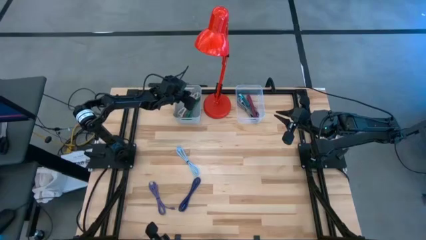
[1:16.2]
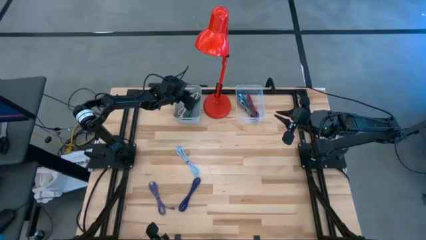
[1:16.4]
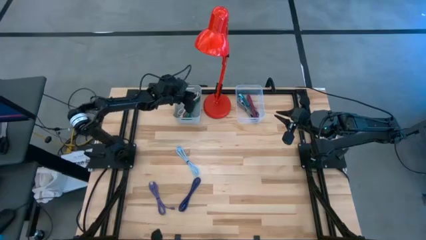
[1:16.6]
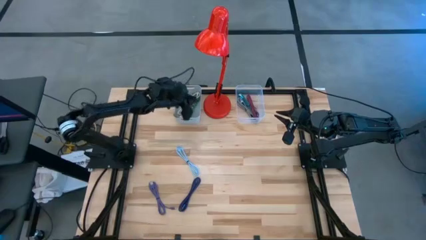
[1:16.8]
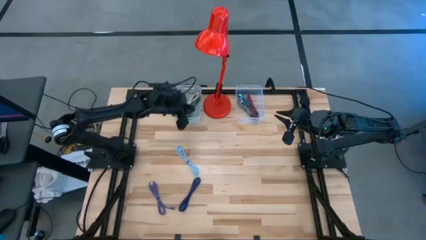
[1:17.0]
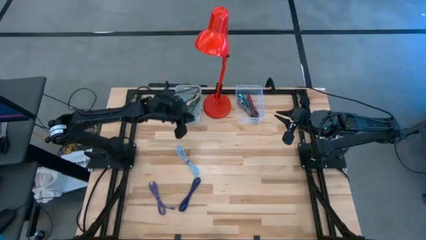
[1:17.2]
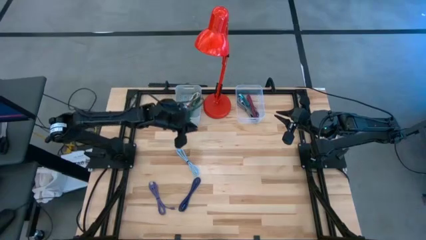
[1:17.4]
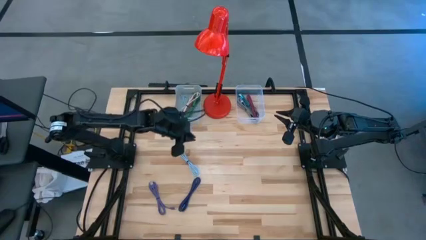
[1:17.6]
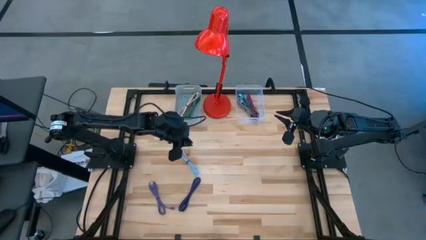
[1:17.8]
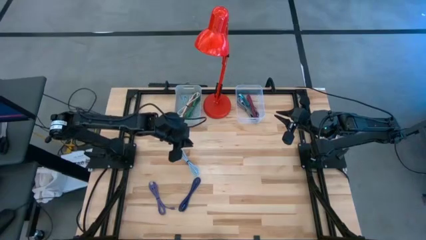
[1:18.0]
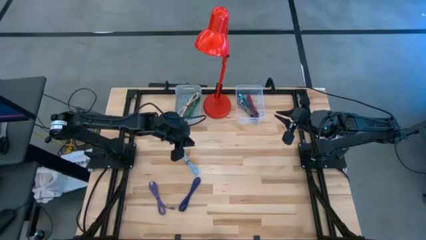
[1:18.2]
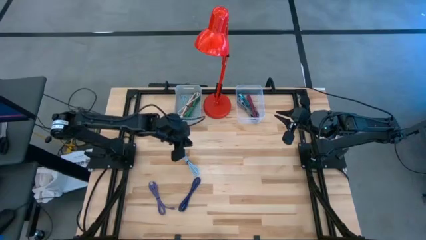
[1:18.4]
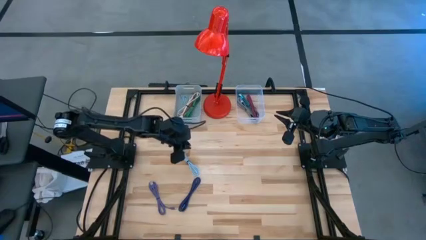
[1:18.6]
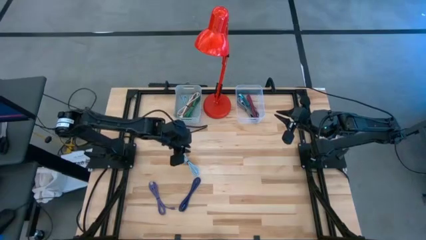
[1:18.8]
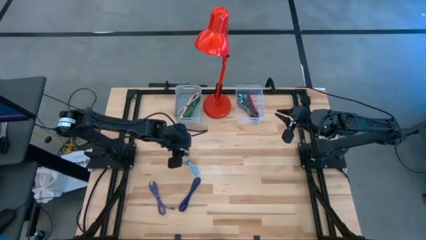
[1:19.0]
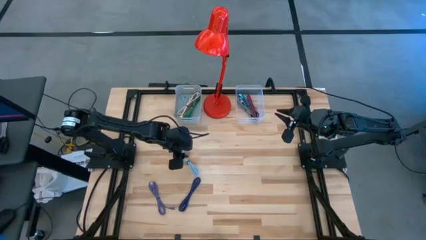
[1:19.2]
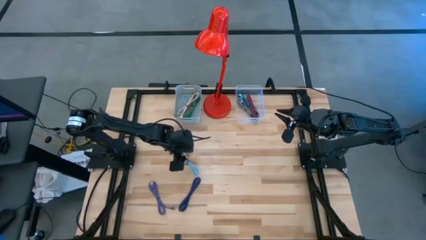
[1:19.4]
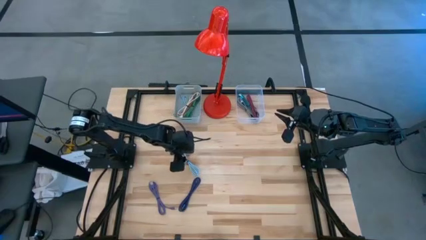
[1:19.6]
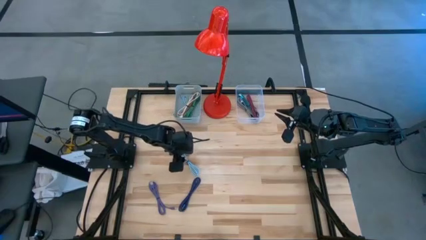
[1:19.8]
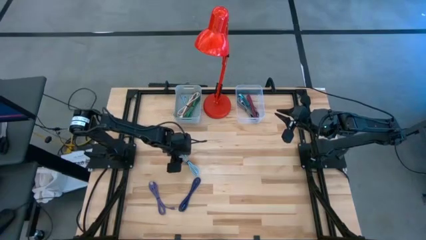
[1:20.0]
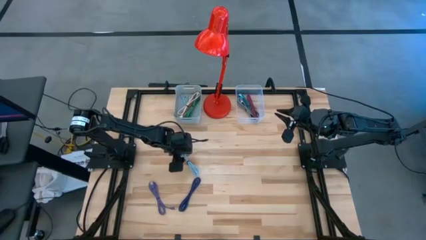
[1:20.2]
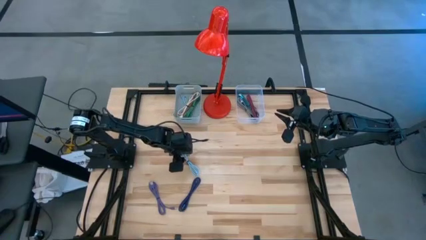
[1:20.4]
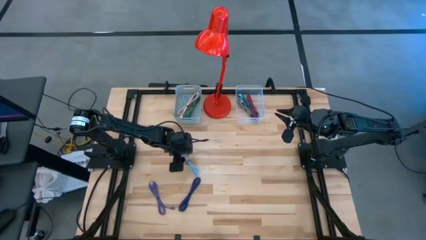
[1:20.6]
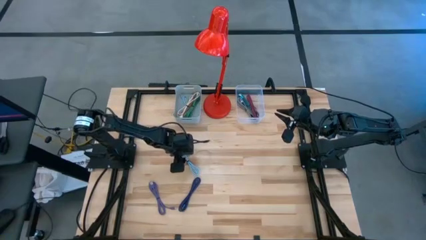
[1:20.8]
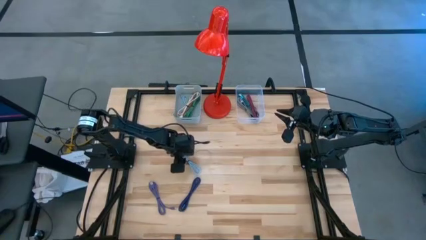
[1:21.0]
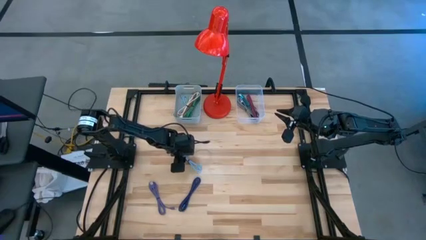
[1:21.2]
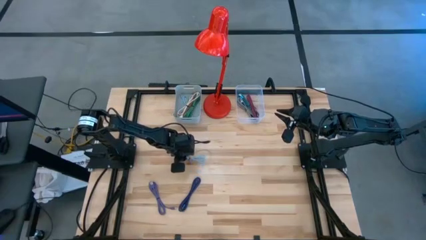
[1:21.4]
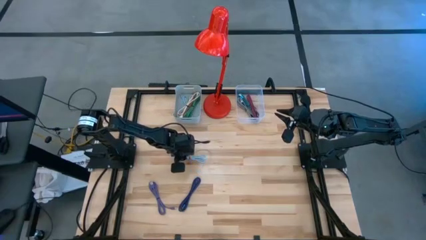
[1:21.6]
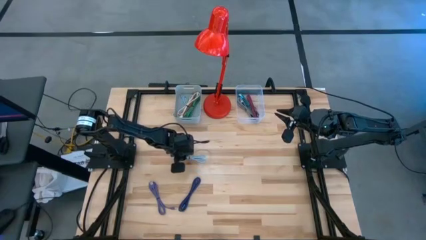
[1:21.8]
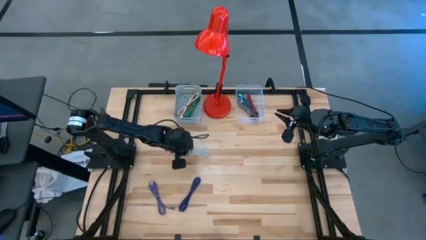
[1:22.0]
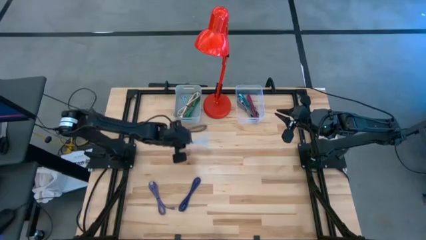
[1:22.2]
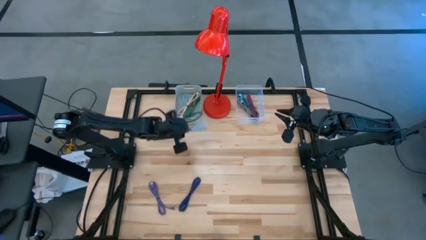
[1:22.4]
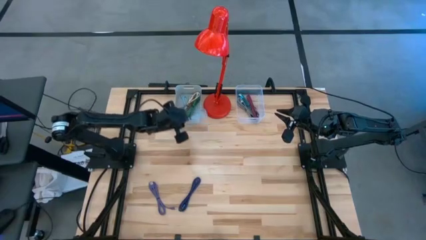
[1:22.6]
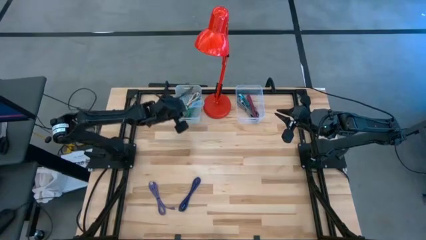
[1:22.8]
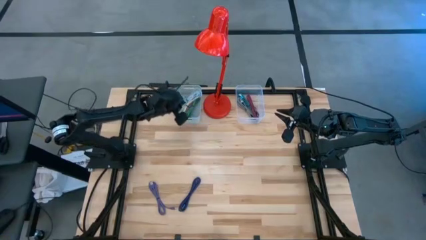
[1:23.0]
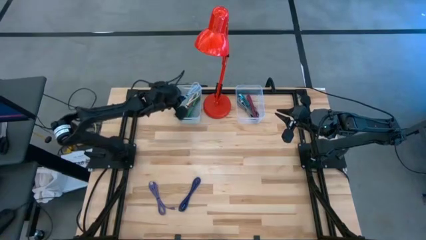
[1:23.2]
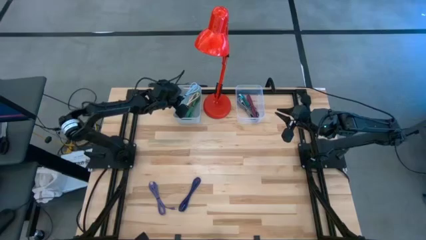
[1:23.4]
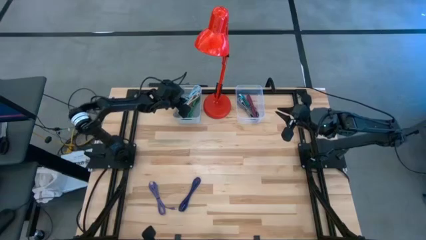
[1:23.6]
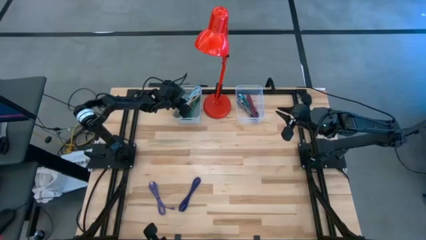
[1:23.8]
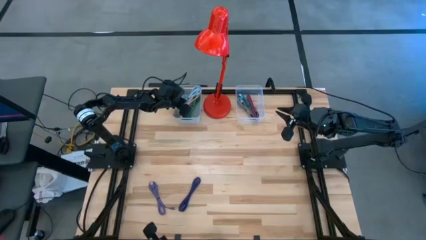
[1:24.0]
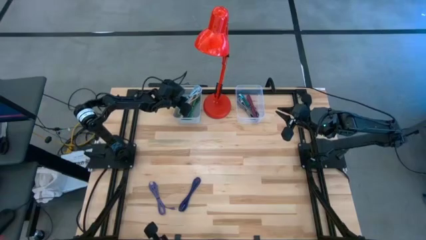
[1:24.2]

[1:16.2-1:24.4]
Task: Pick & Place USB Port
Put the light blue charger cable into the gray bin

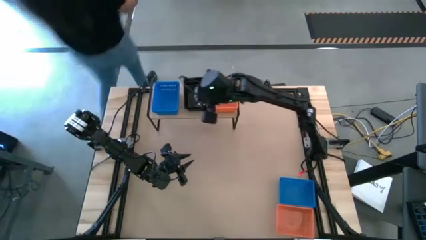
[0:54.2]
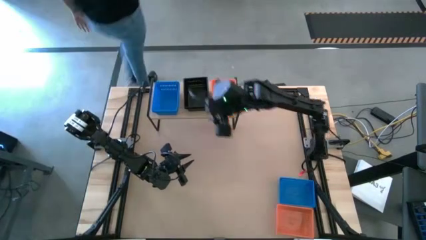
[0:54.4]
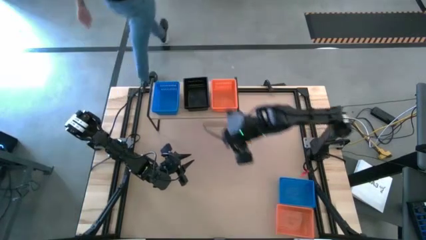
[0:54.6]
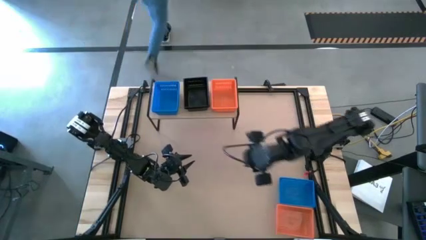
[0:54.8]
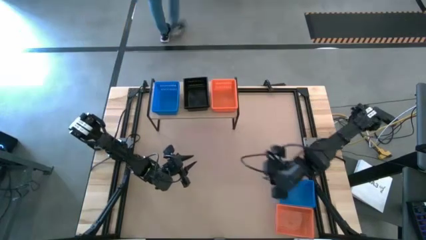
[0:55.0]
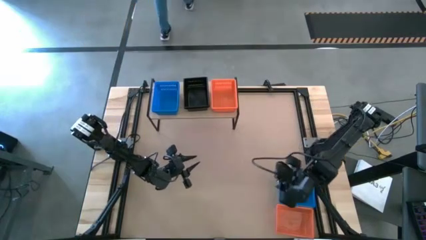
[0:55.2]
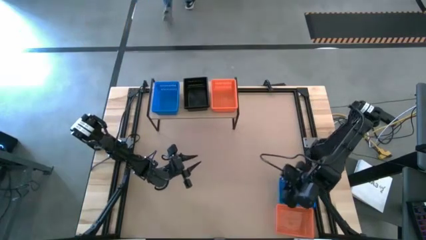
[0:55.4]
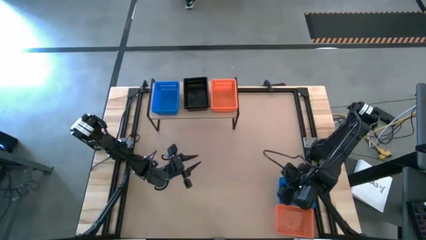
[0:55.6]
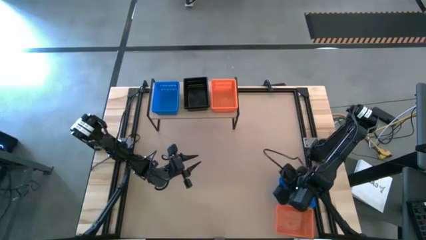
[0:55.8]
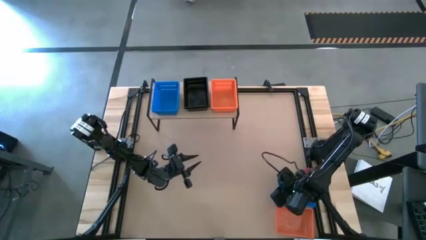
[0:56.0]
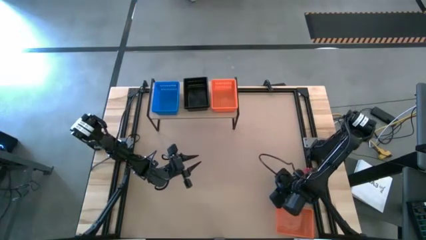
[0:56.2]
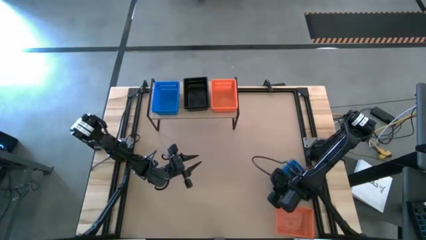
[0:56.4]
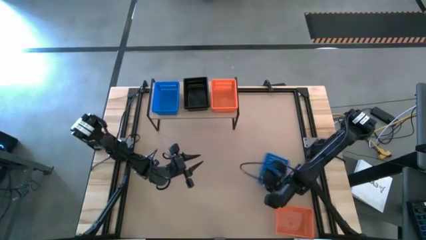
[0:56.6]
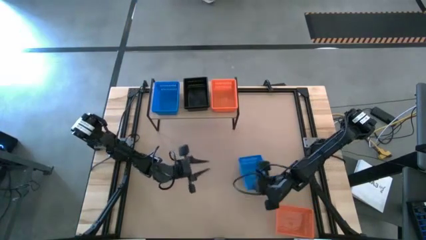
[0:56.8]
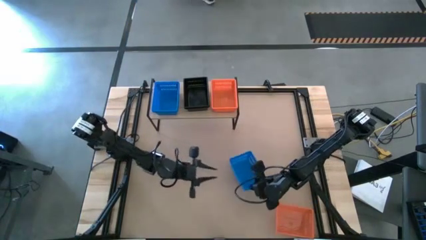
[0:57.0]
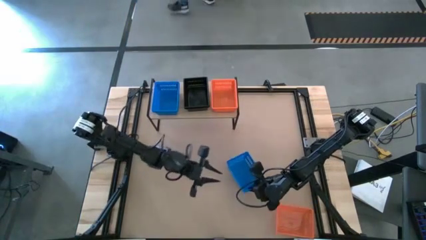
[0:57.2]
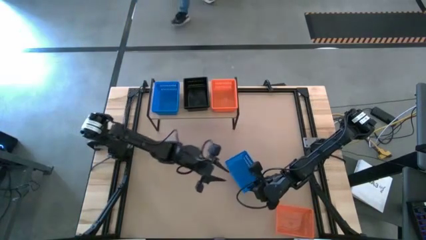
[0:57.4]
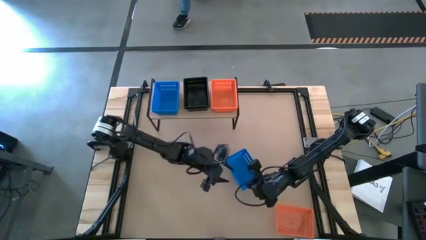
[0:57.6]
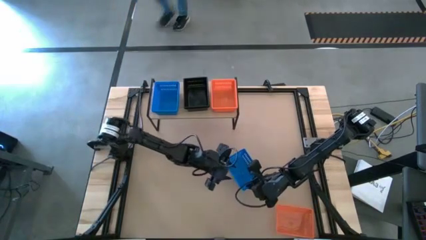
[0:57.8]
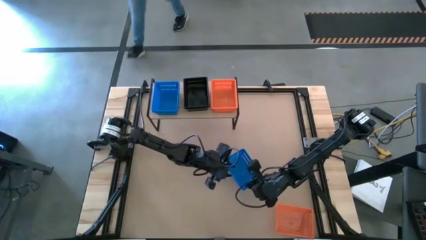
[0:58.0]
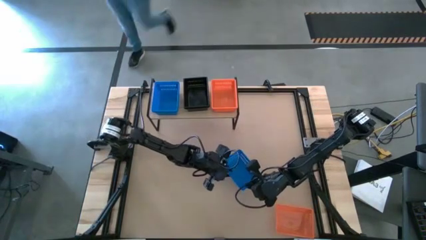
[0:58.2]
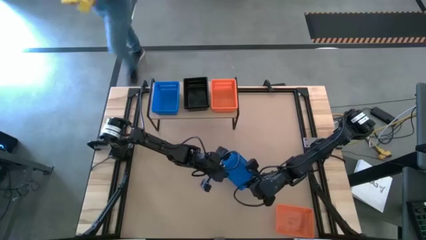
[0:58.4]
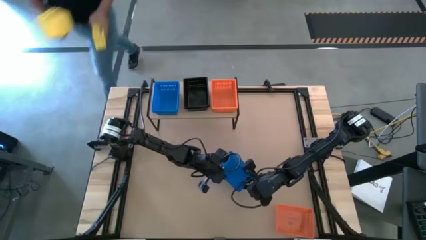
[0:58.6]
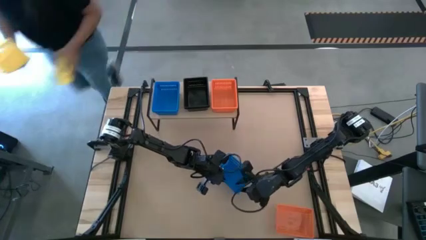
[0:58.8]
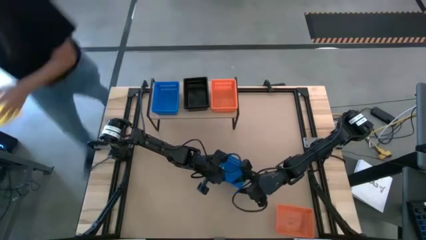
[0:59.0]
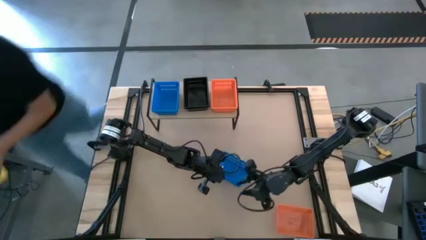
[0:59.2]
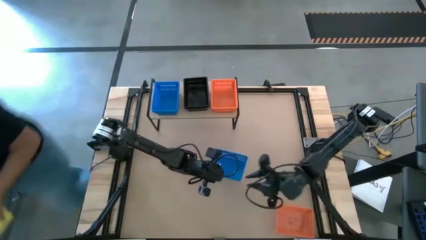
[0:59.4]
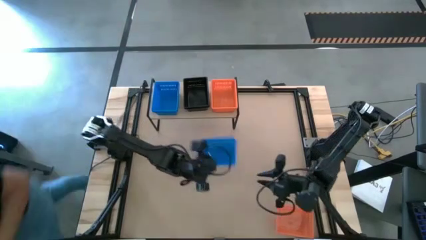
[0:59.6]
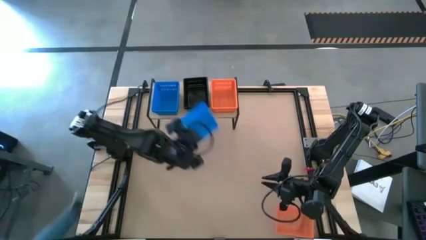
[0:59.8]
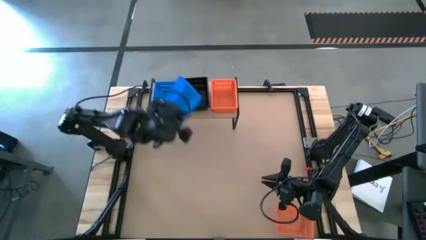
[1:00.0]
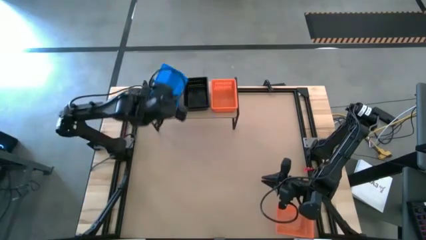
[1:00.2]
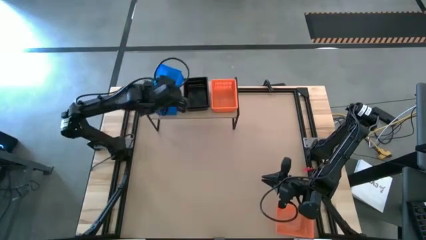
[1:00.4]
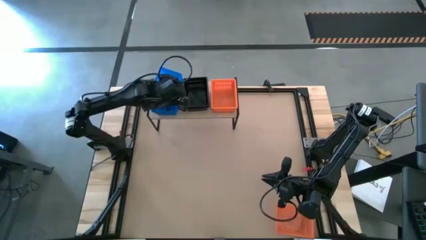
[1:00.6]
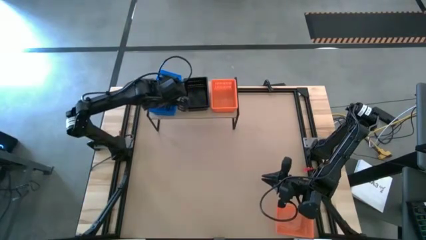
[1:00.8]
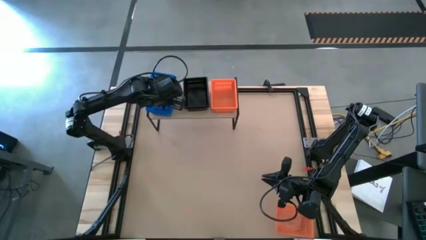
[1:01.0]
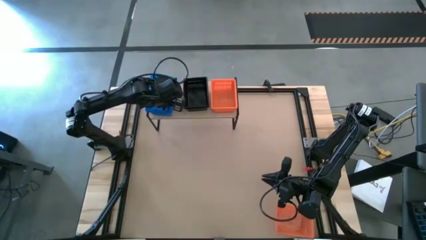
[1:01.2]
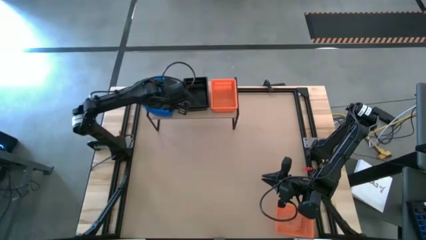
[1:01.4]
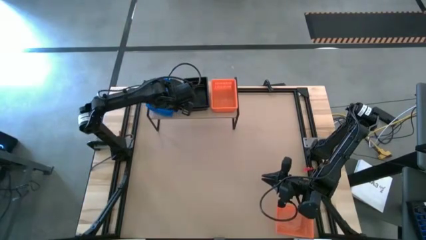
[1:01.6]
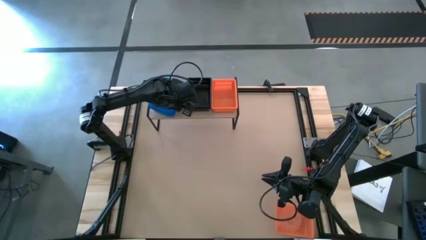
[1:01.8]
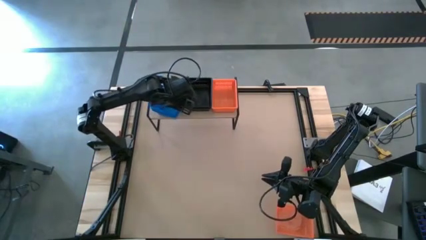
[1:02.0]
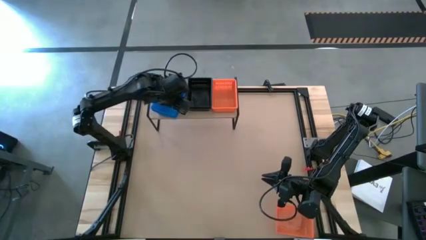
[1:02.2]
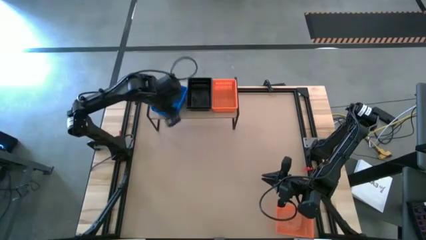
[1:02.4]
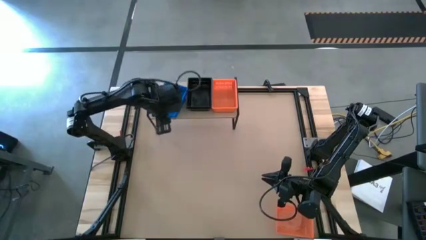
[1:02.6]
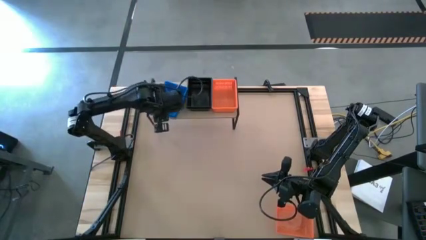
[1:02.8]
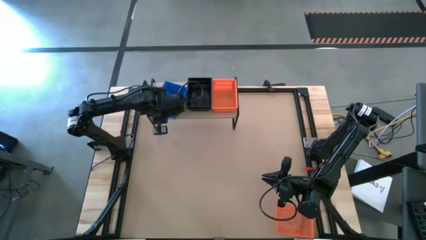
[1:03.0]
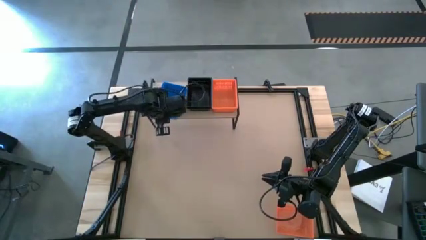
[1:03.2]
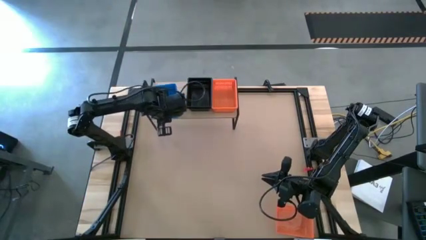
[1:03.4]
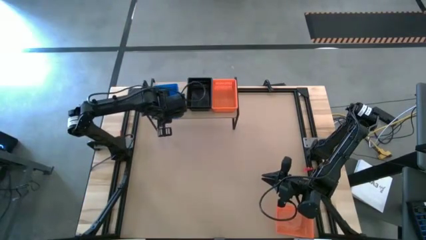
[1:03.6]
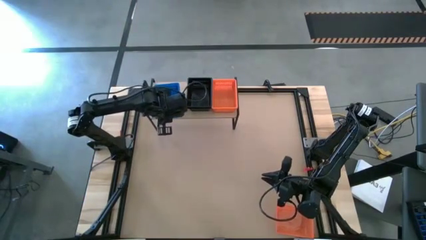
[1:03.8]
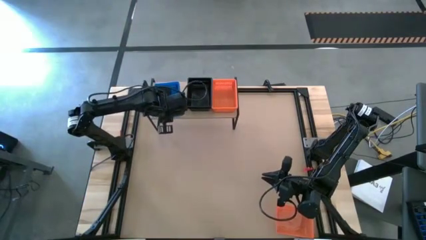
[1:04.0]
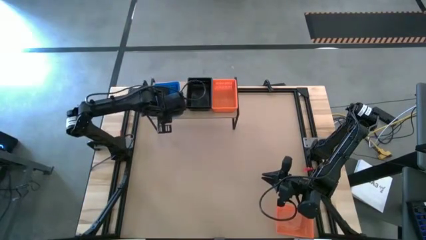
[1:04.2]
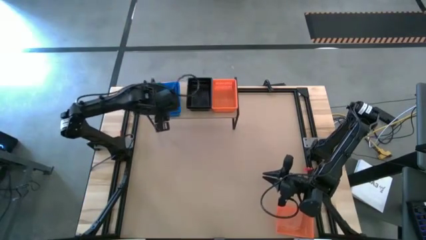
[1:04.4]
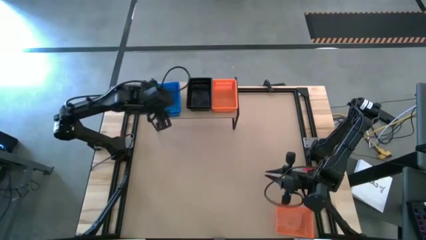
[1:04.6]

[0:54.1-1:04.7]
Task: Stack baskets on shelf by color
Stack the blue basket on top of the blue basket on the shelf
